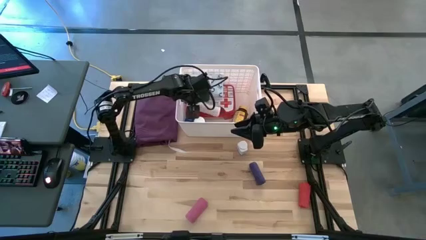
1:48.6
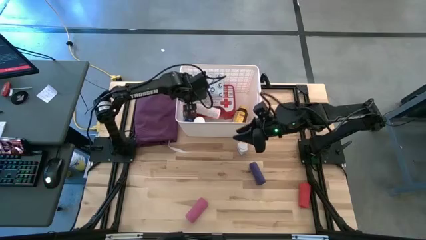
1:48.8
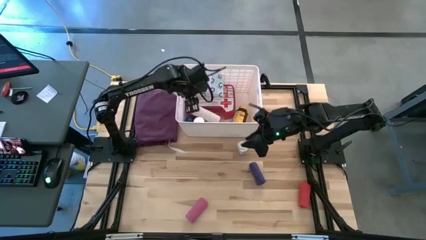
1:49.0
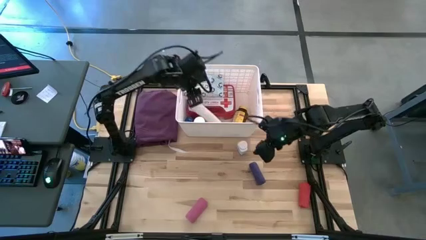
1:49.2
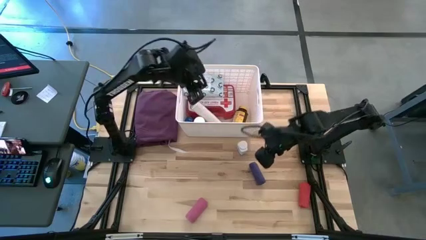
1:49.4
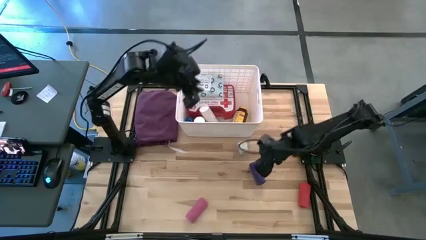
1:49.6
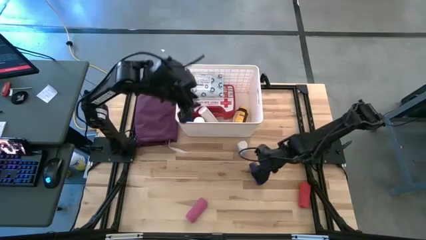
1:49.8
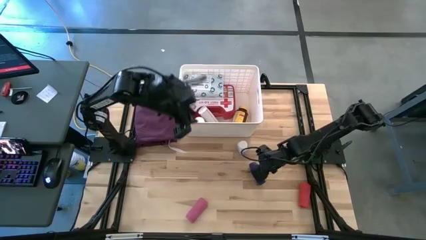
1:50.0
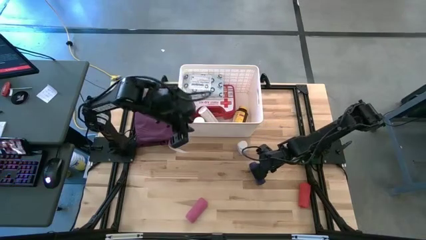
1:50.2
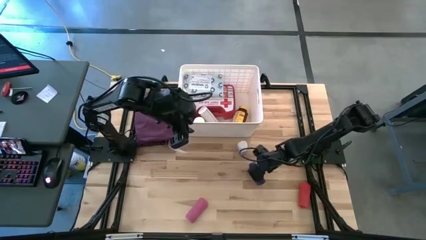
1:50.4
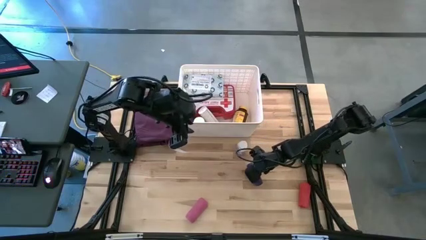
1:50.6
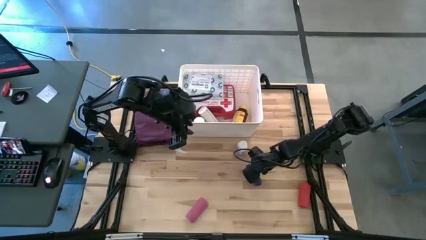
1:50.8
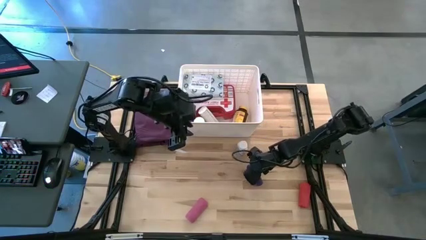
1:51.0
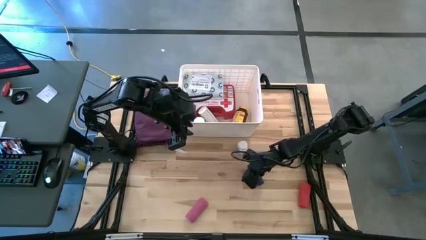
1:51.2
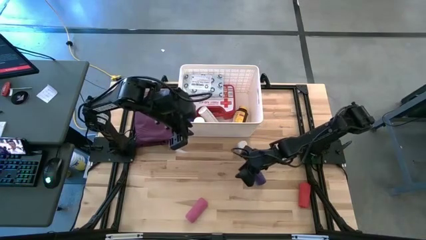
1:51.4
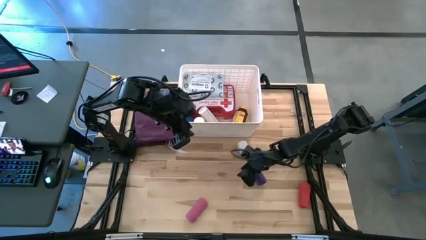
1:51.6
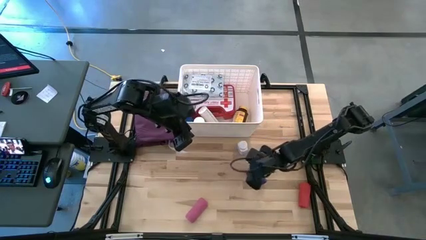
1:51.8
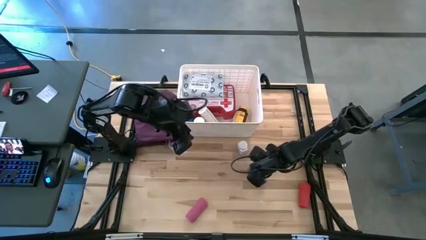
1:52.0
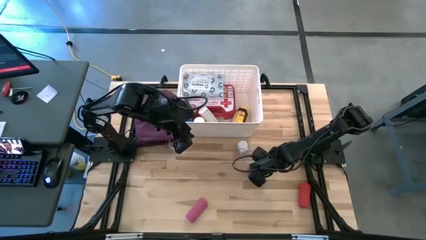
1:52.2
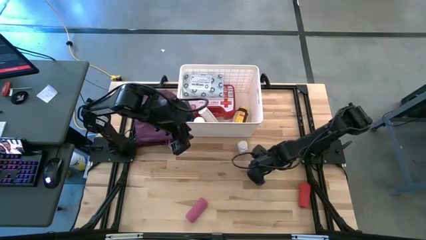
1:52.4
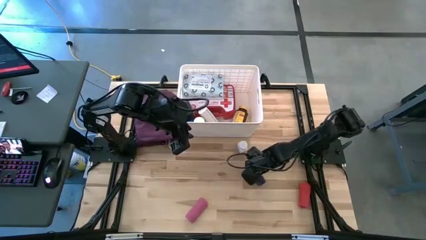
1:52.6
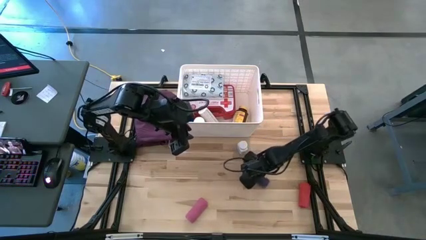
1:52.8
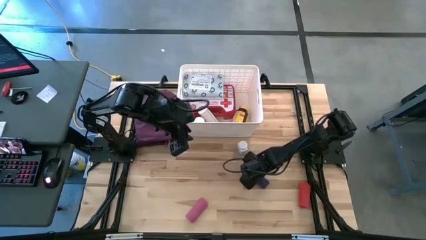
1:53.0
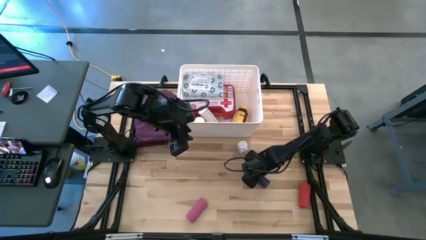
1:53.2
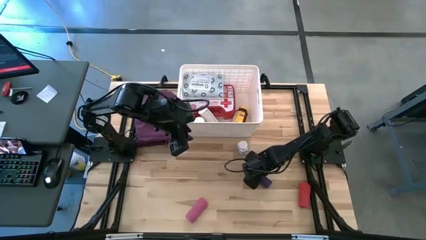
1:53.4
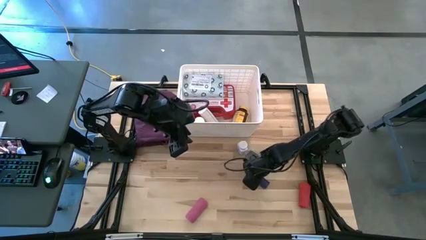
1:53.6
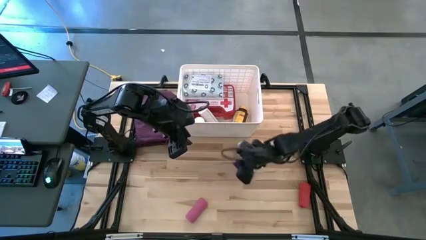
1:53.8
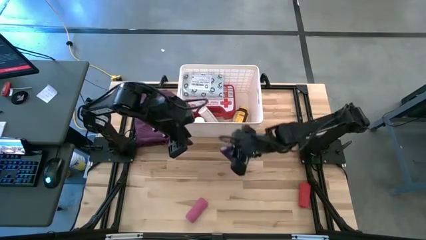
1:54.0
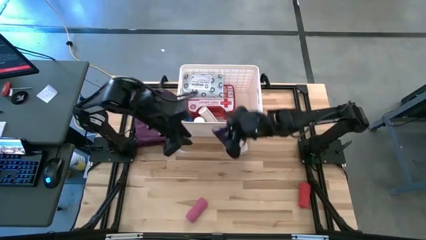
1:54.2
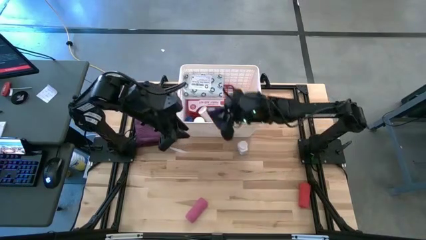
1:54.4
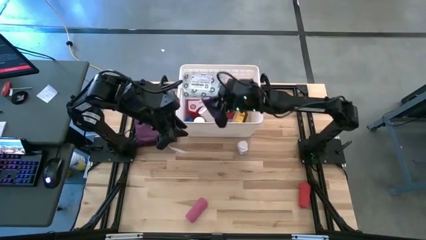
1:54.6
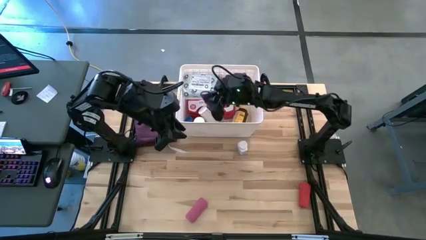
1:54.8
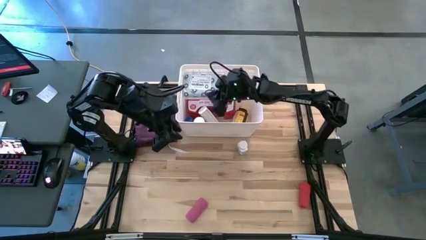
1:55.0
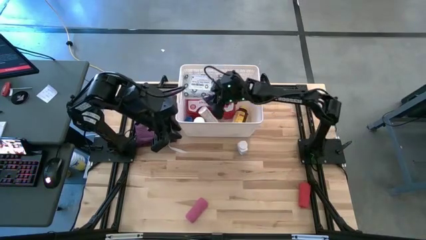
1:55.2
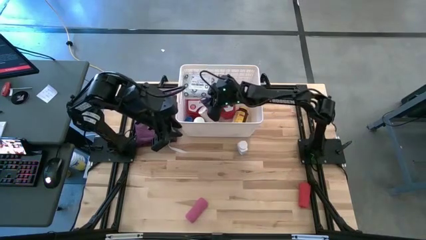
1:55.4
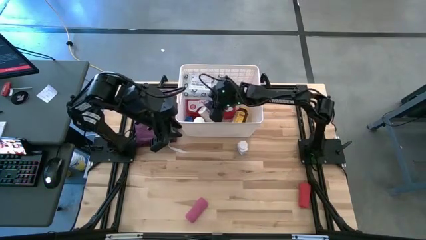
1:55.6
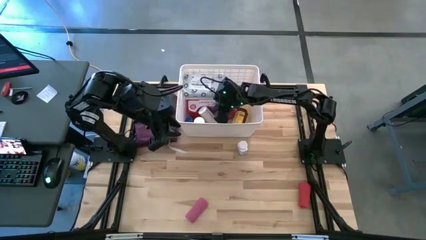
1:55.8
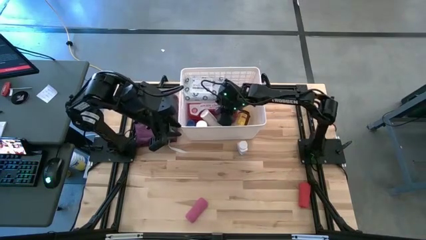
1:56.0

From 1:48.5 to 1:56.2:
Task: Pick & place medical supplies in basket/bin
Put the purple rolled bandage into the white bin

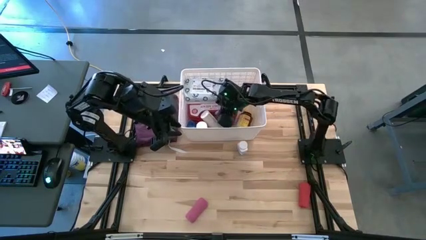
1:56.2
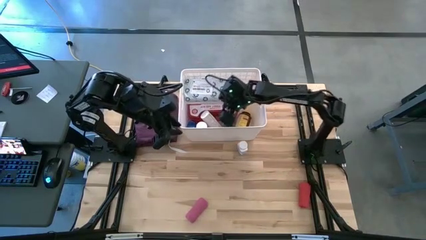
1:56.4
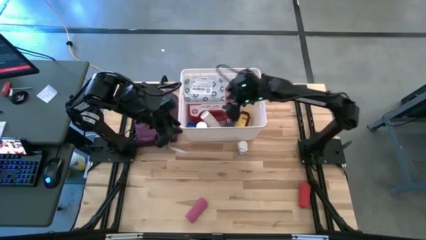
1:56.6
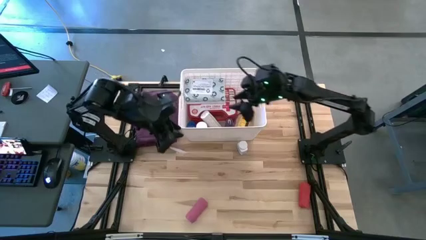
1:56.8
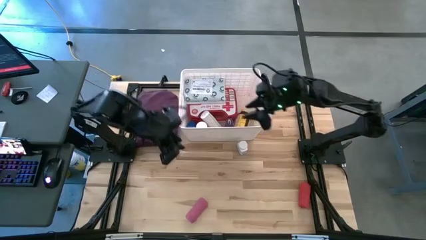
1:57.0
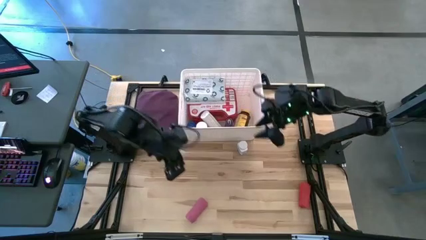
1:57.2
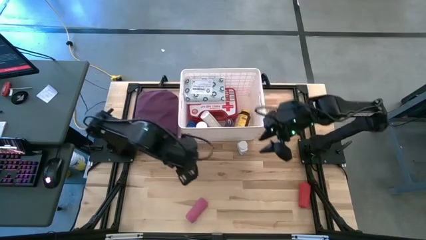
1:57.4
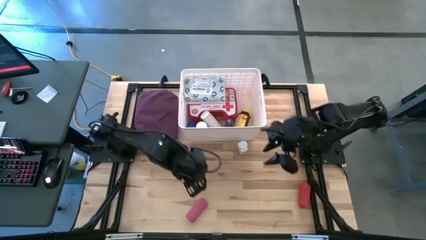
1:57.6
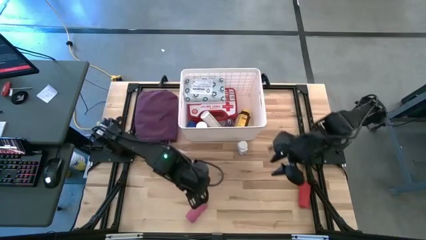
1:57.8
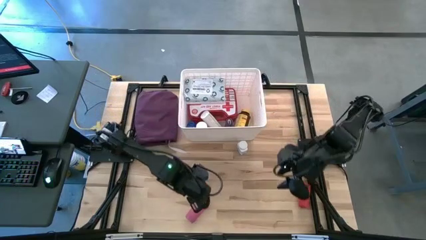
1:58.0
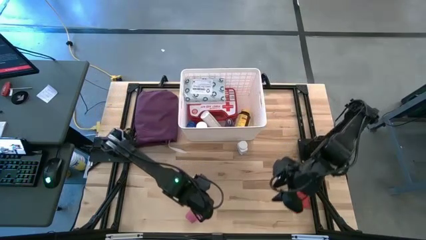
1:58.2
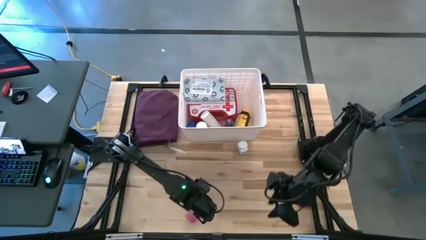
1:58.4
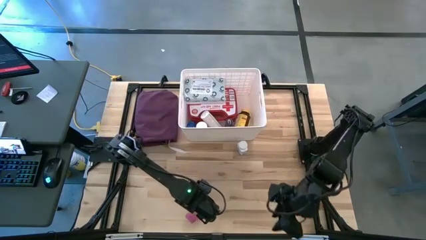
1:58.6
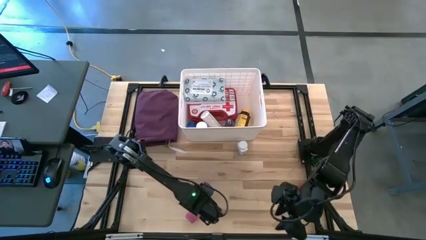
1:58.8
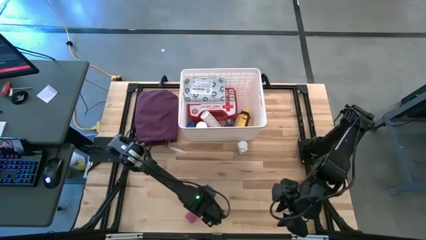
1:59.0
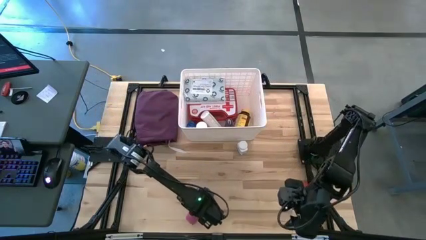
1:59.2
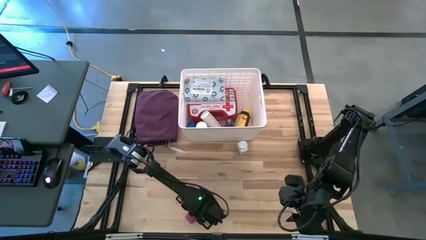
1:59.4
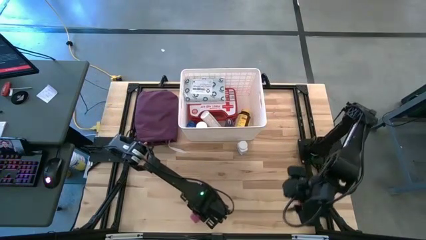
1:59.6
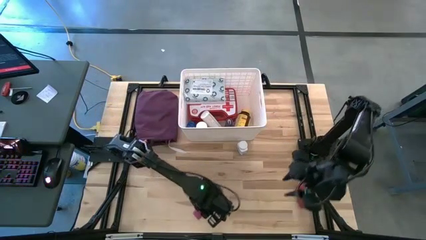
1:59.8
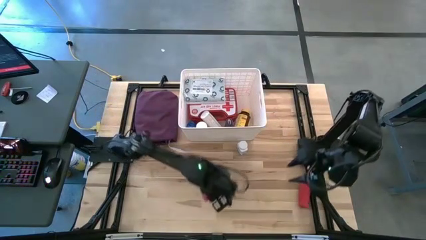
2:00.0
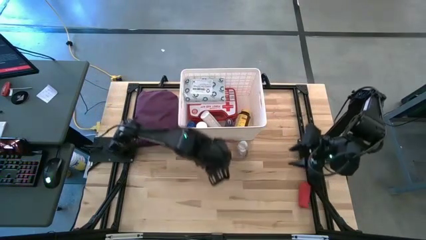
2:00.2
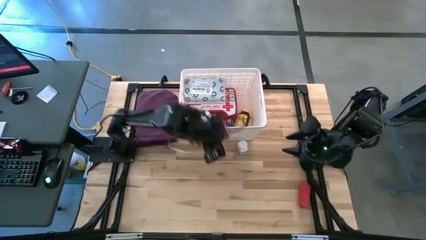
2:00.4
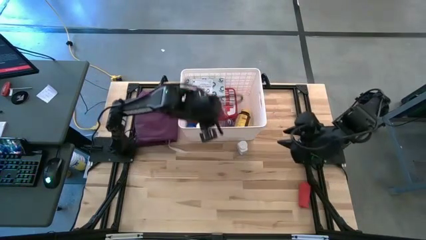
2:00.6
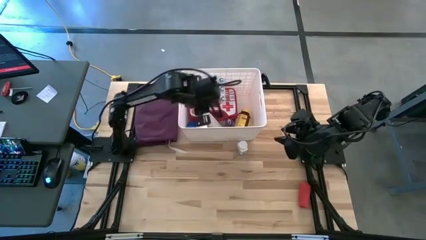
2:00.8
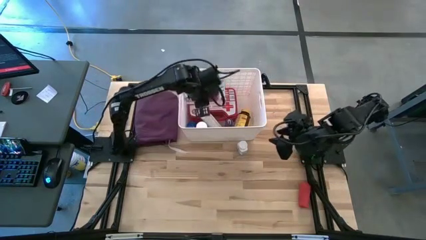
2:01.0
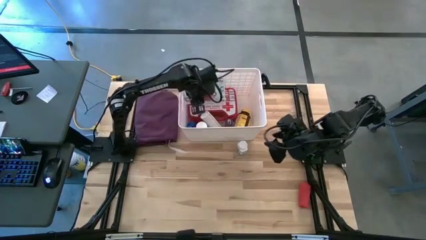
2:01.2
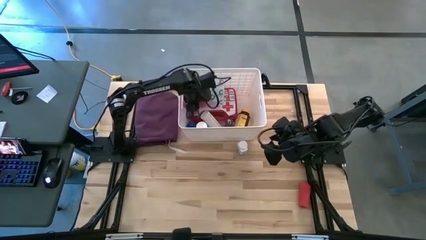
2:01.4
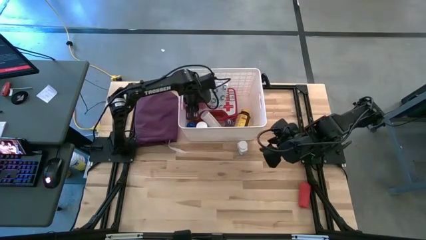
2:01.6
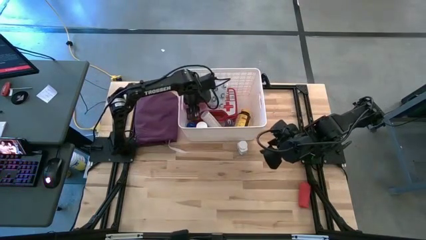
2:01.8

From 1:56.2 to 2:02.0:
Put the pink rolled bandage into the white bin

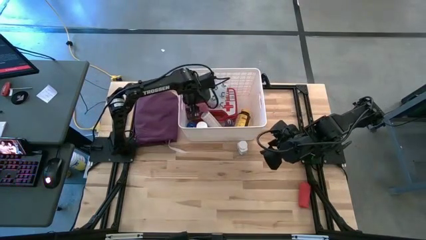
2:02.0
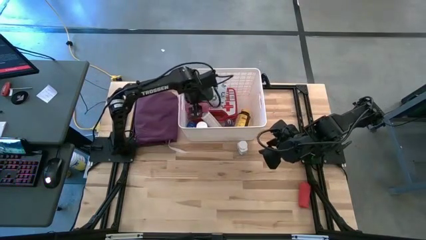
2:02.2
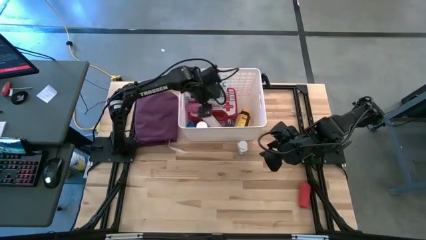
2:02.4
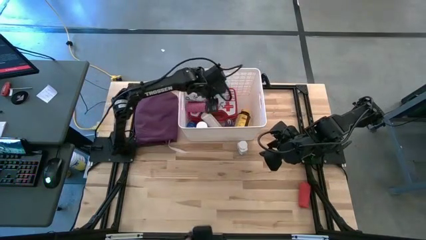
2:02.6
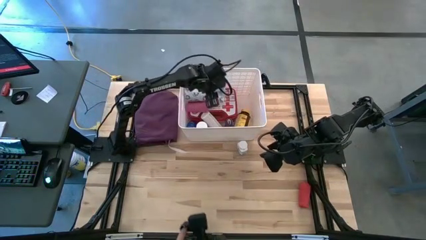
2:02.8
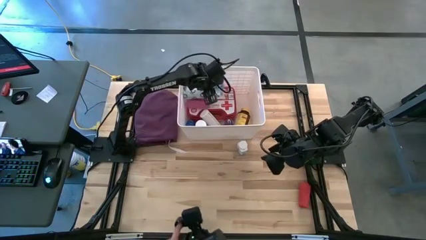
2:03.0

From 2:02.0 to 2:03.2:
Adjust the white mailer bag in the white bin

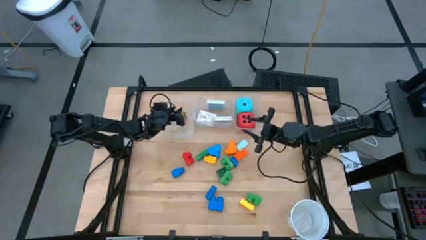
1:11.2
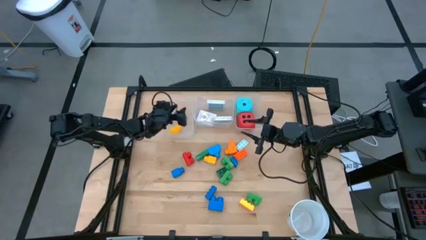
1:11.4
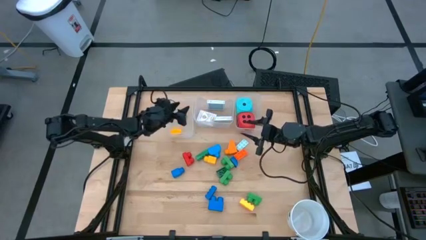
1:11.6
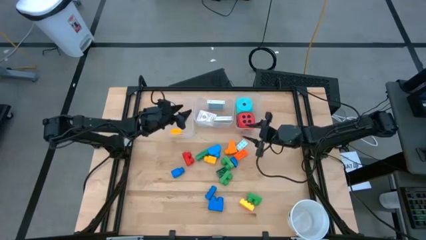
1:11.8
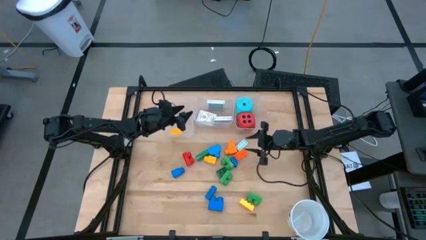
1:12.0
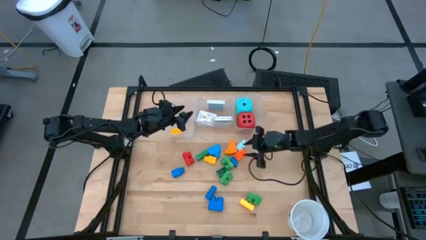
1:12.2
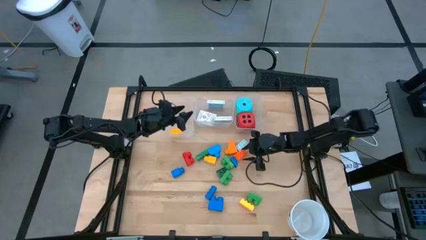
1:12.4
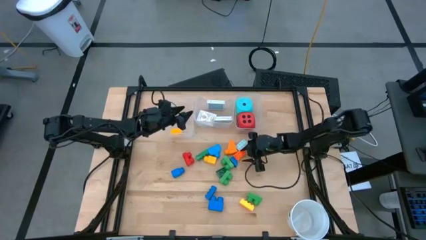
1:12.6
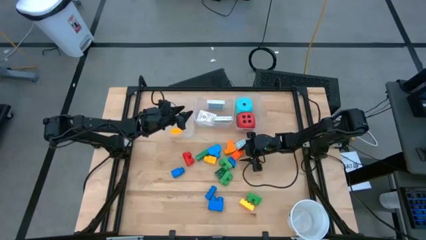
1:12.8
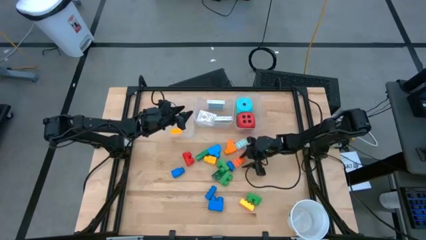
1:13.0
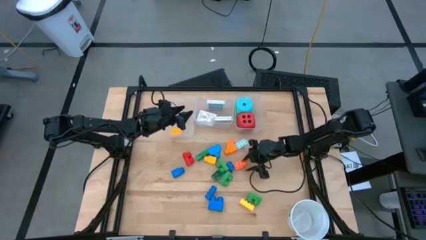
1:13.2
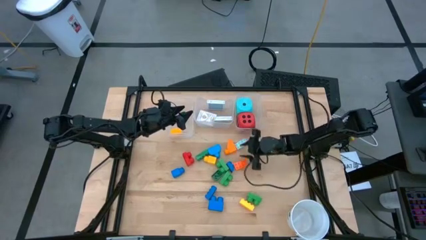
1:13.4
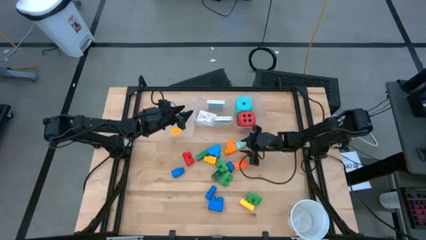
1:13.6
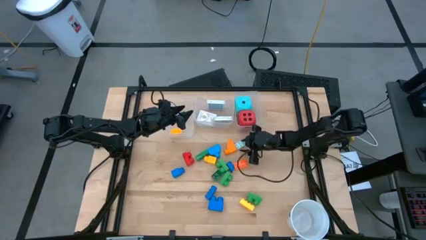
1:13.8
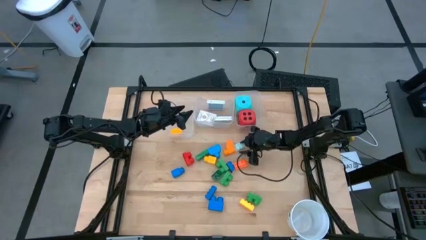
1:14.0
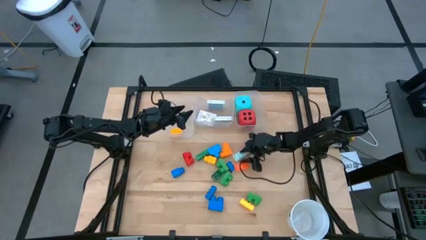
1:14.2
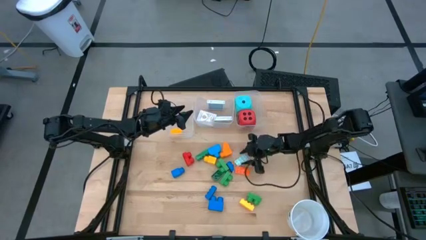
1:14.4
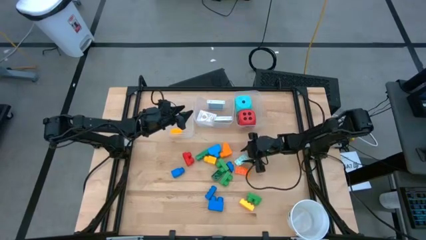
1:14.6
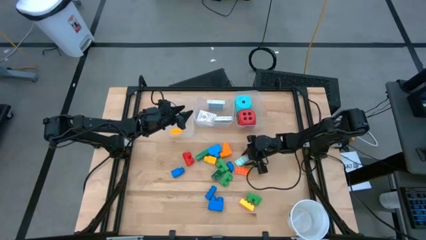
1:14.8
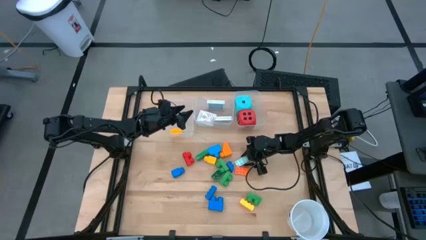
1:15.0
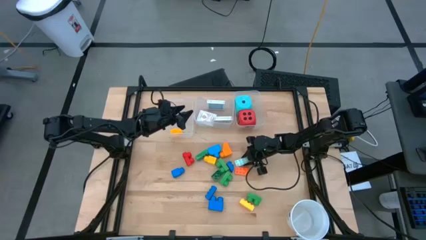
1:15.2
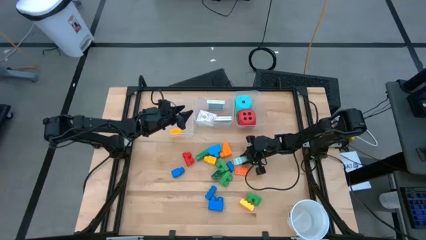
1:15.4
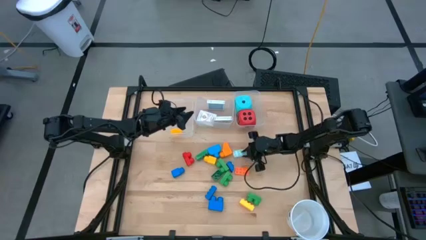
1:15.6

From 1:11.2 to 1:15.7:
Task: Pick & Place Toys
Put the light blue game piece into the left transparent bin
